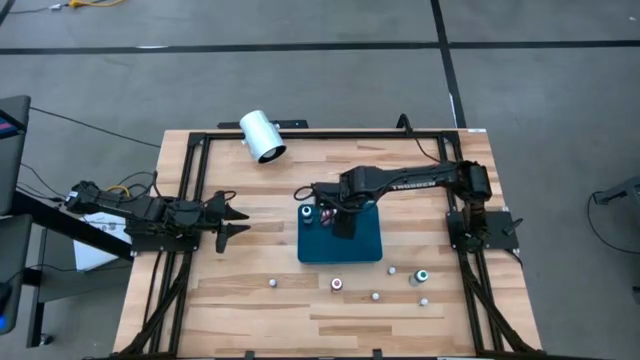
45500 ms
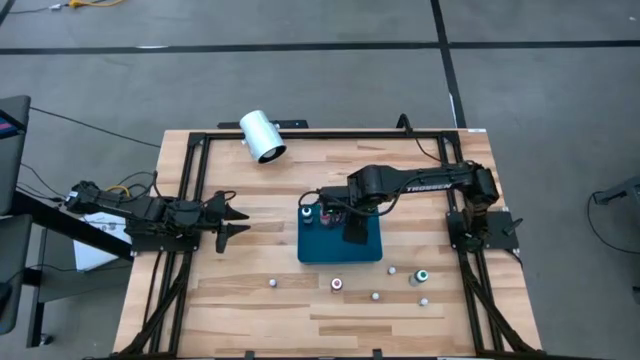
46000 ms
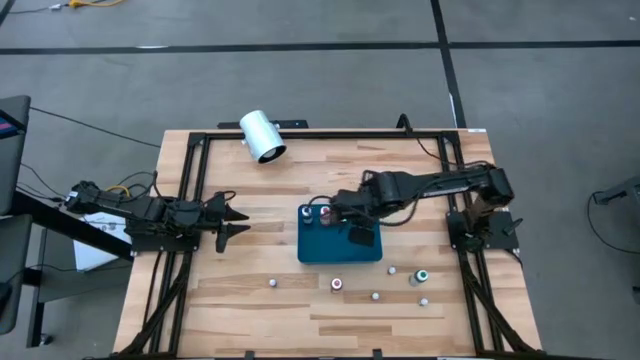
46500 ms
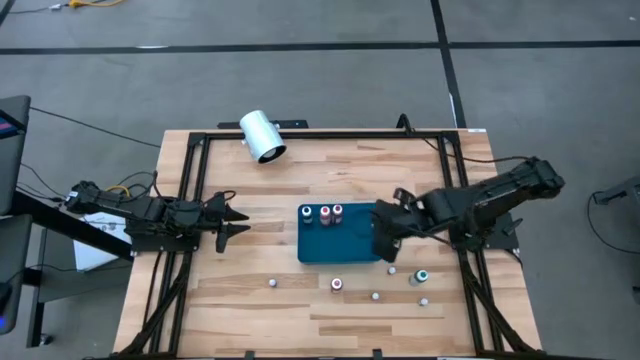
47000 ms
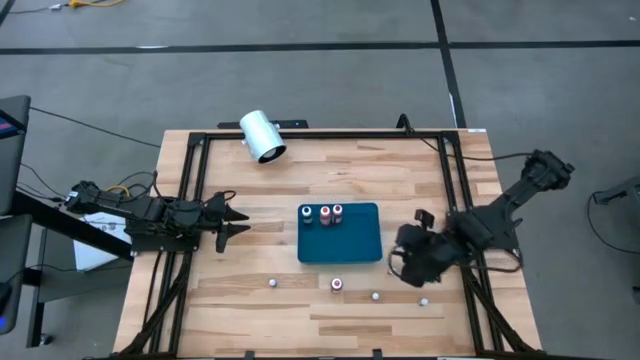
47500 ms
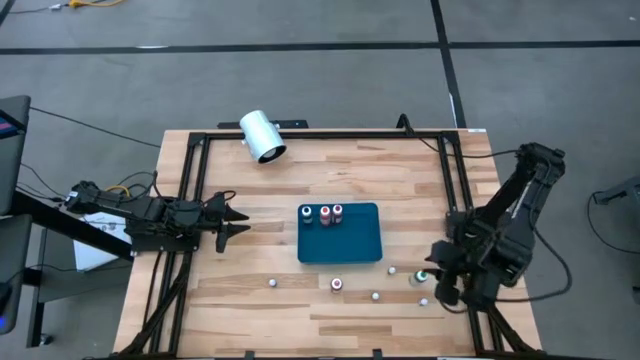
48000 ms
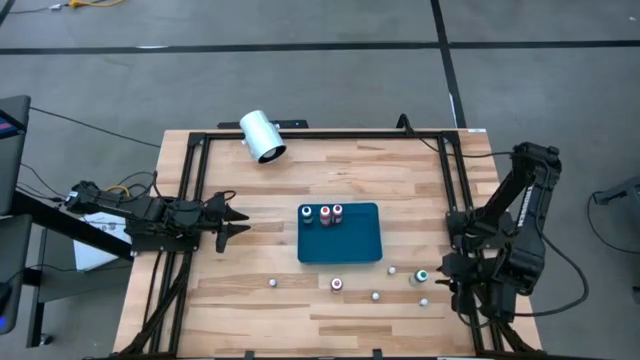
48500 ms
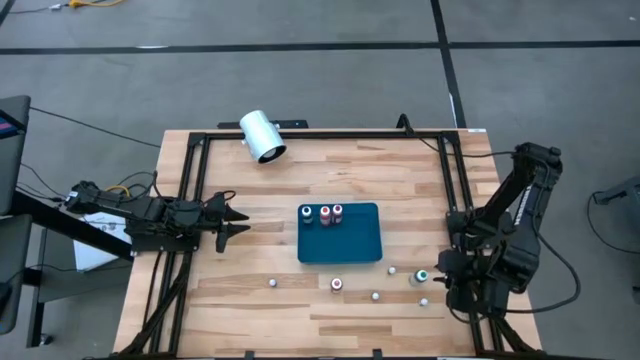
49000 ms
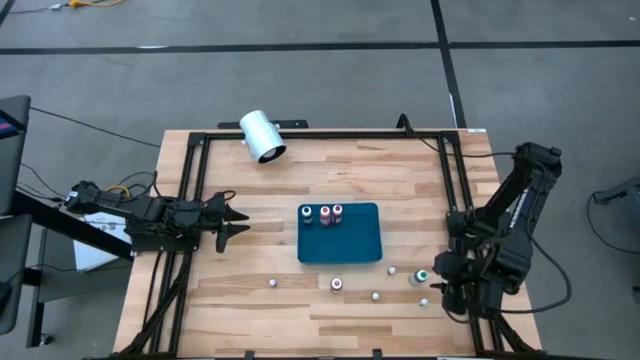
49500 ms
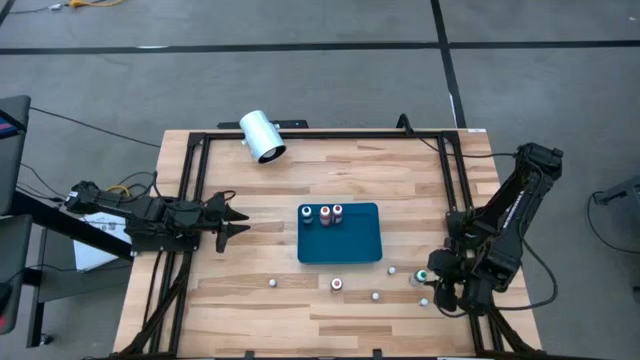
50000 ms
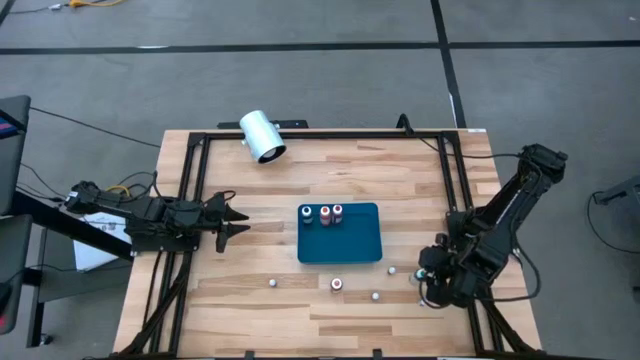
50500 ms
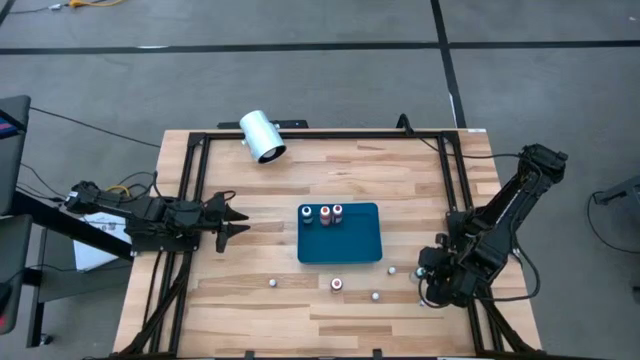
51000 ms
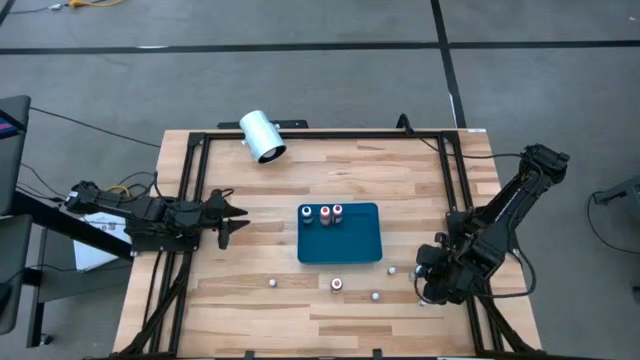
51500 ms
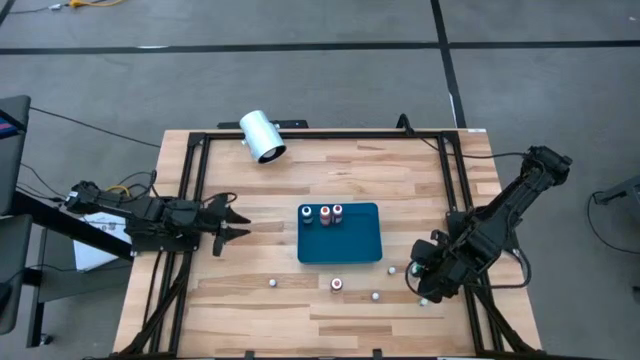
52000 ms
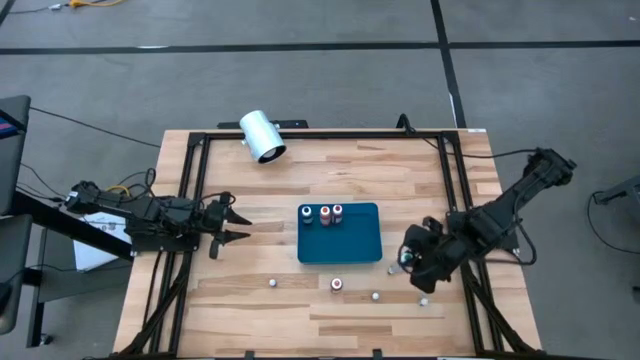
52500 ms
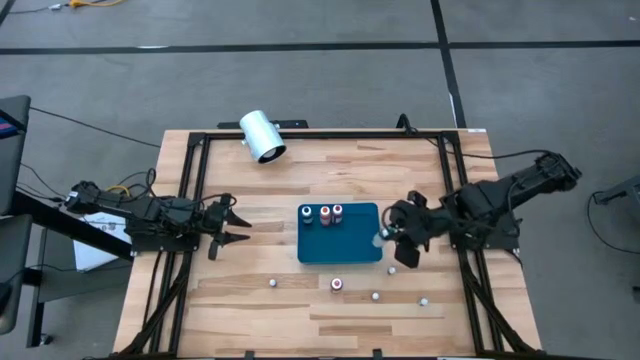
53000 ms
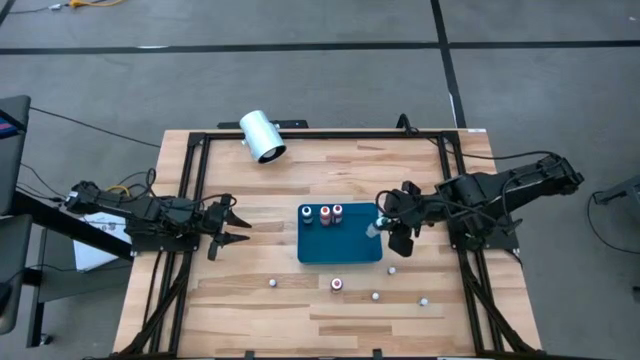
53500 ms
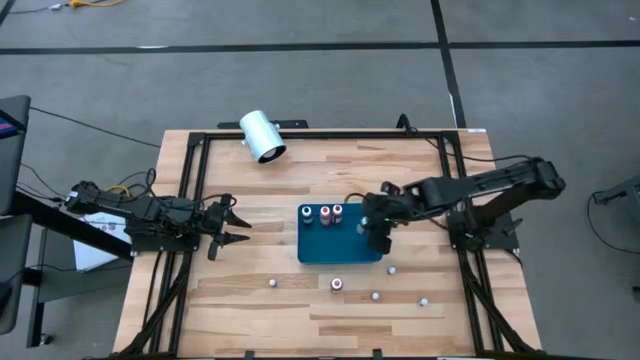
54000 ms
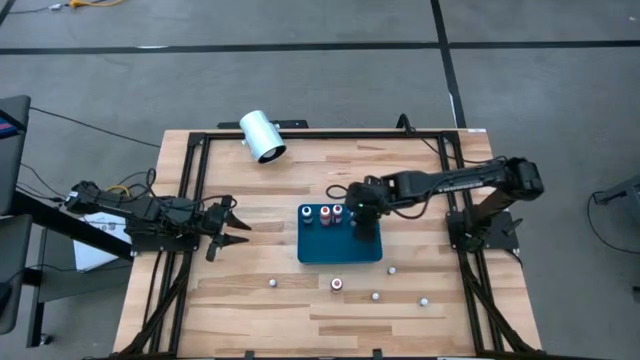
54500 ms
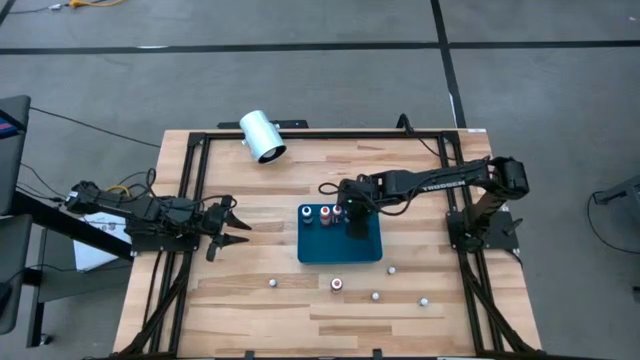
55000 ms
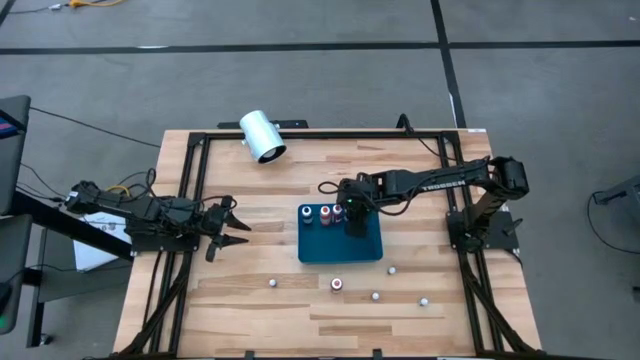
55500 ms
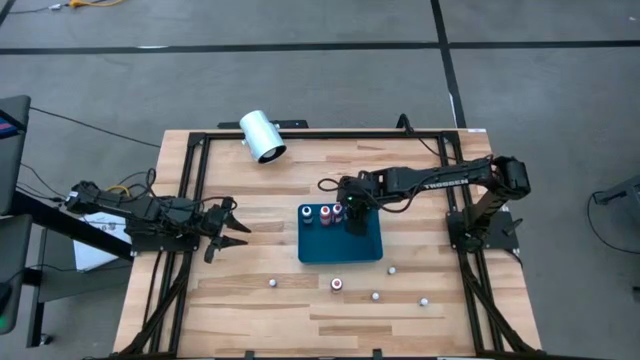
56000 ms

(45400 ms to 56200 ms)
Task: Pick & Place food coloring
Put the large green food coloring bottle into the blue bin

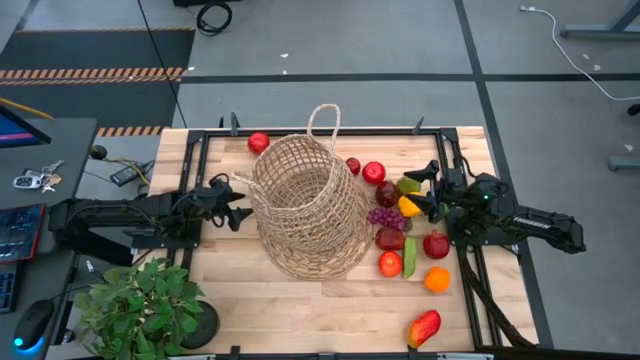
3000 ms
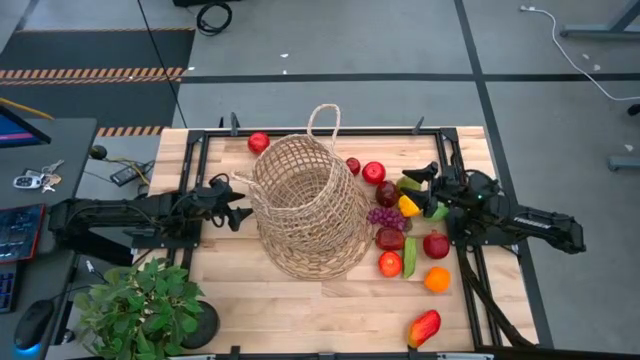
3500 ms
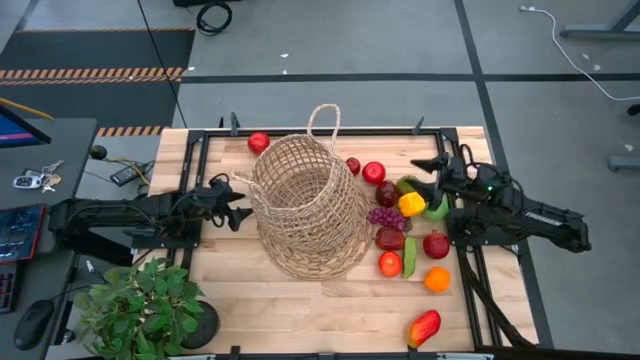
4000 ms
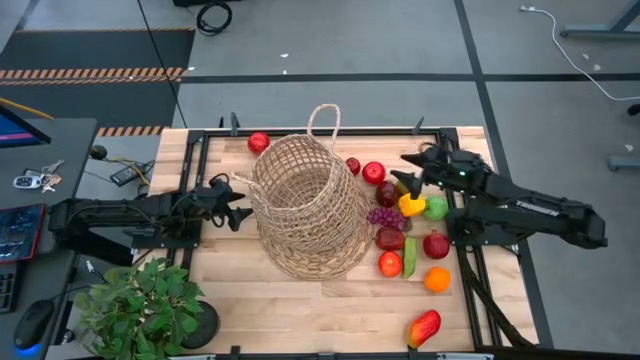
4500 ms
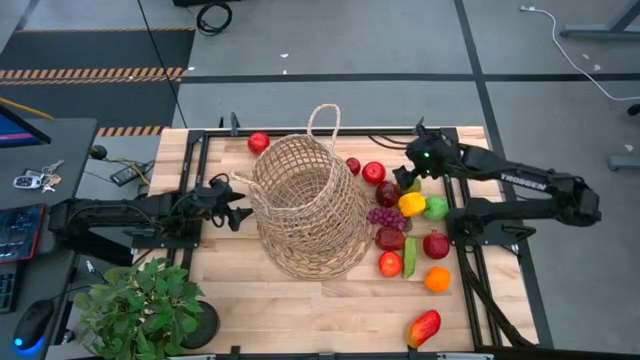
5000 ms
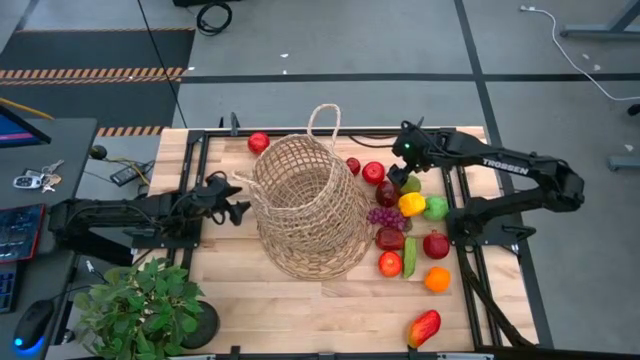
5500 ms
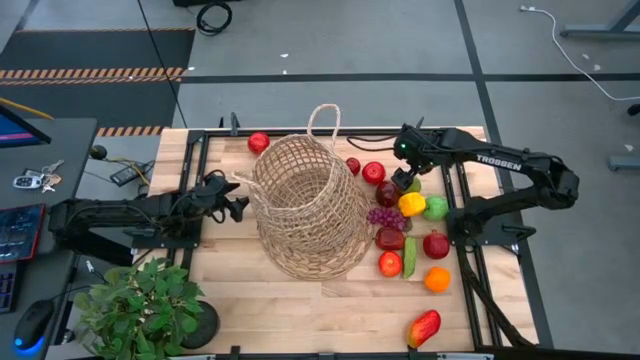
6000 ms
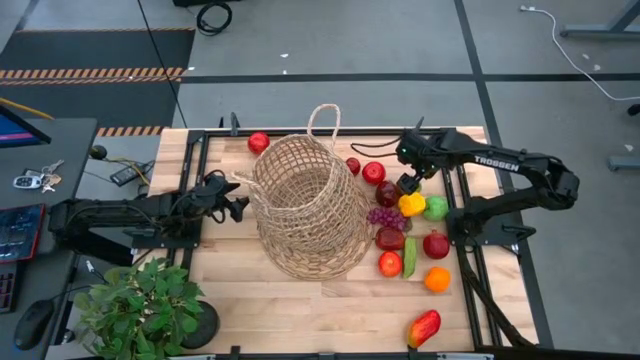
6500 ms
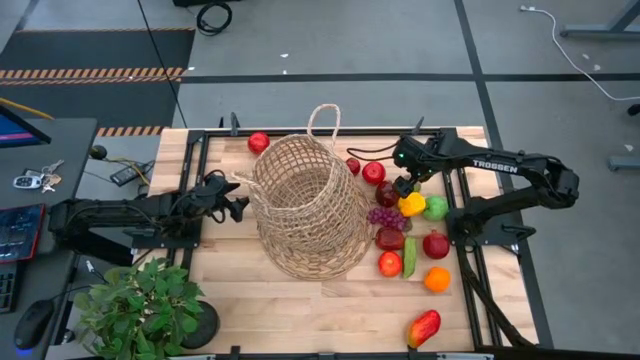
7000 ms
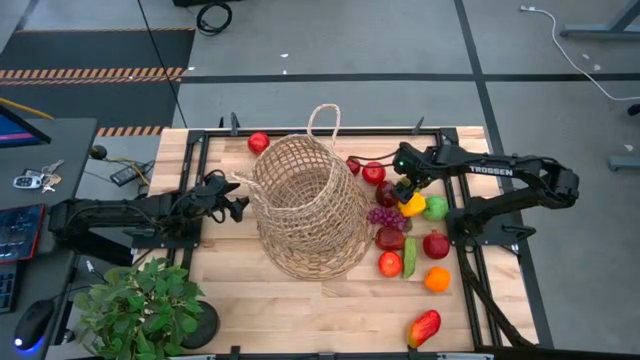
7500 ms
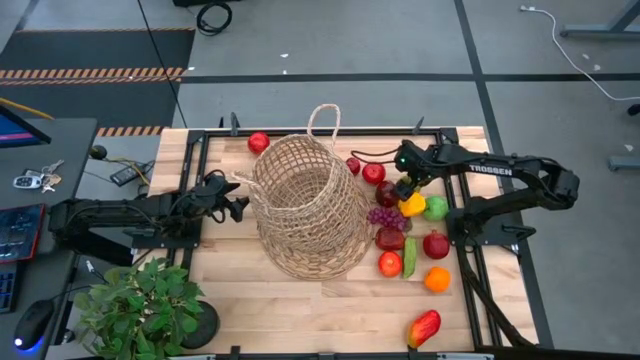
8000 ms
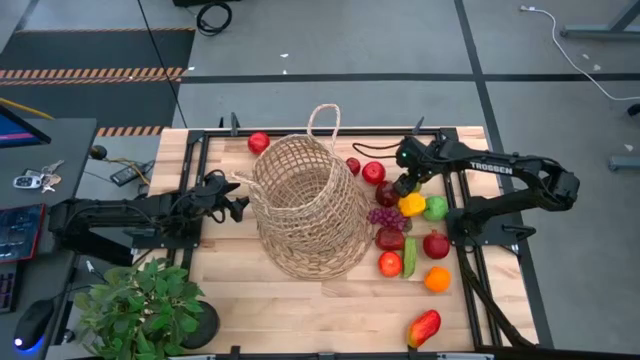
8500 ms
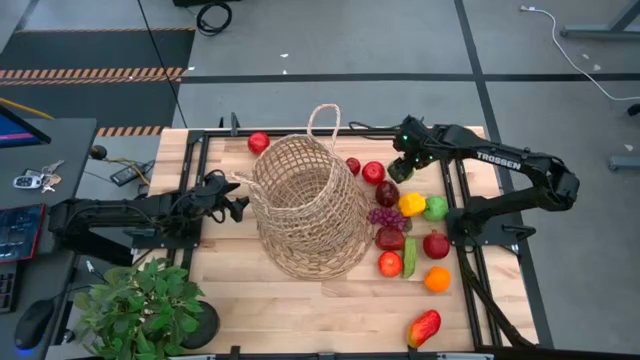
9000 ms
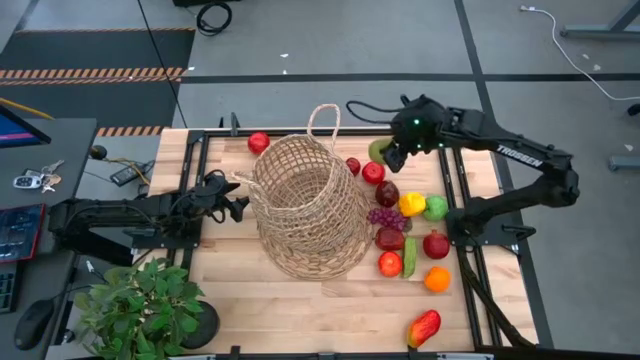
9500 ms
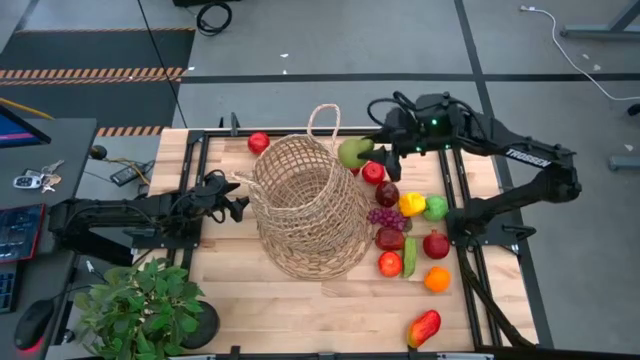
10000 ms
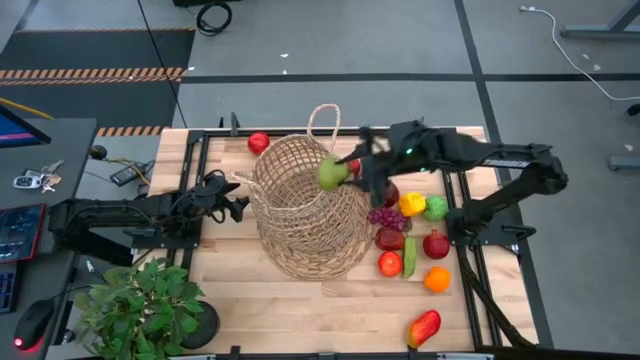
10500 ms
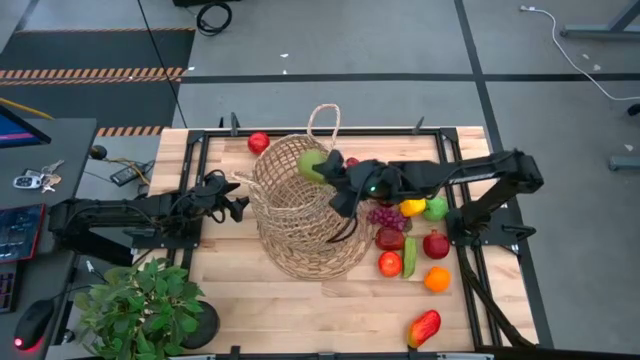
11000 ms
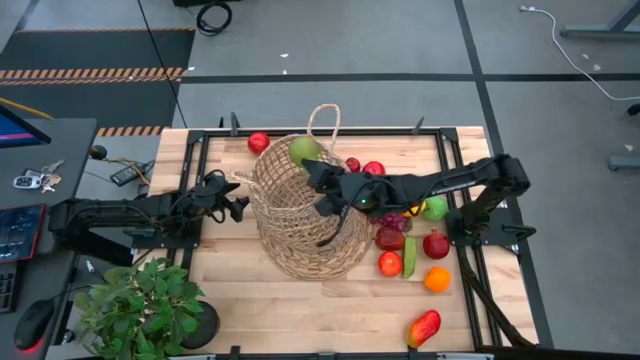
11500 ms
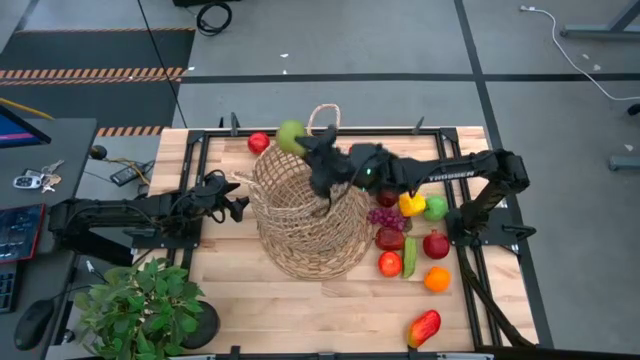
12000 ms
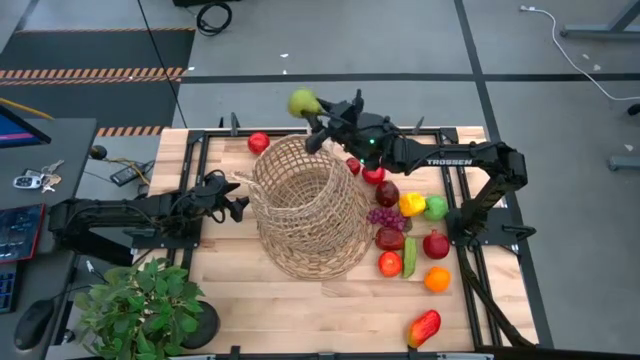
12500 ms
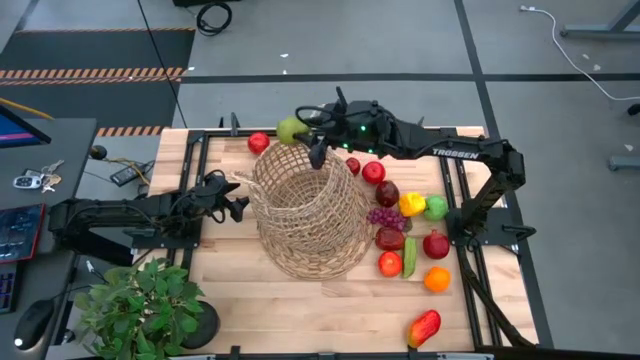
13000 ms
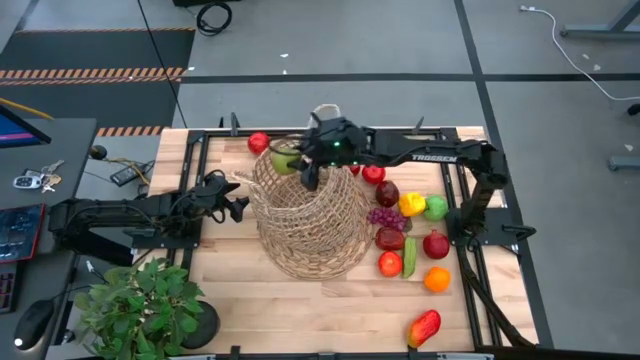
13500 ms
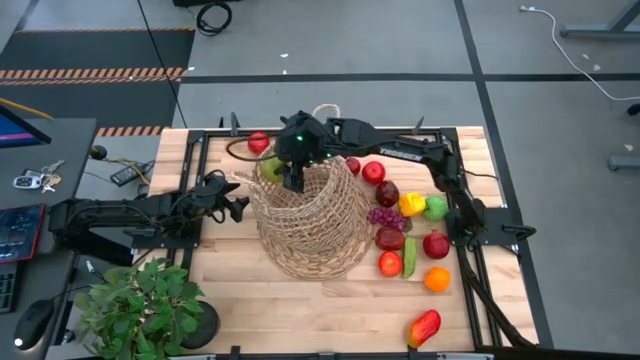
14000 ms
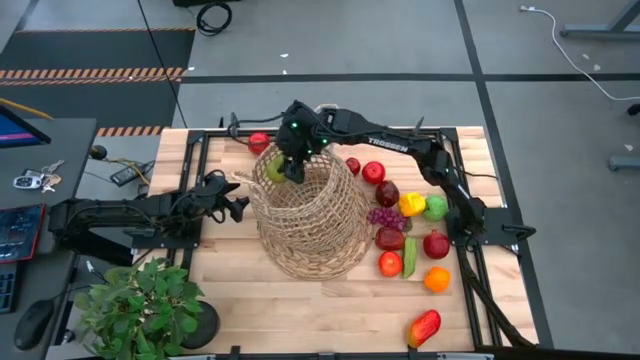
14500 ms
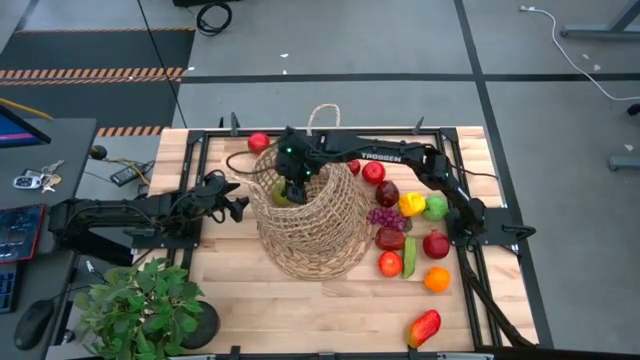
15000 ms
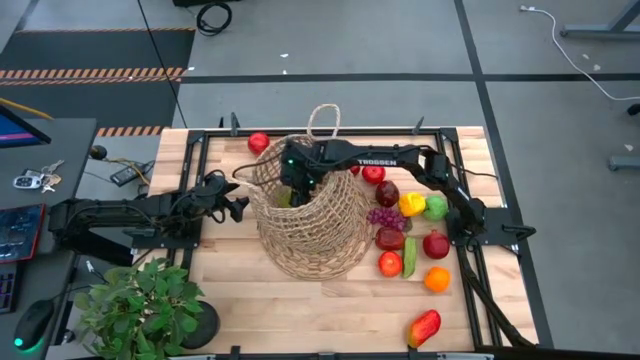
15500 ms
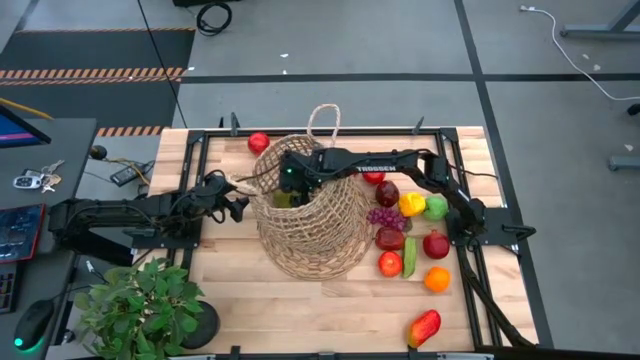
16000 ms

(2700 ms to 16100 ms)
Task: Build produce basket
Put the green pear into the basket
